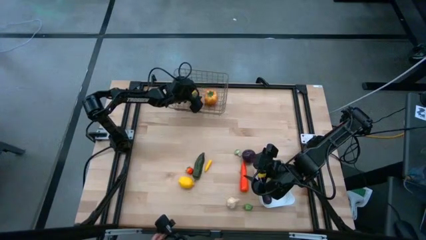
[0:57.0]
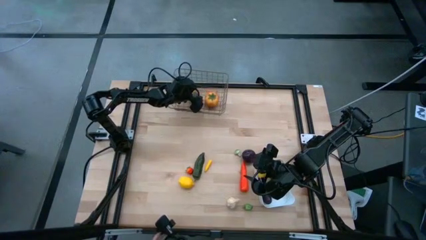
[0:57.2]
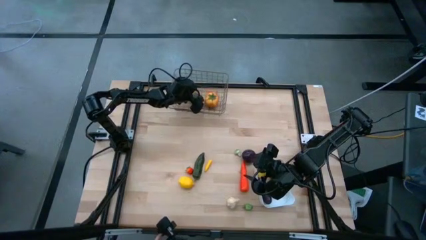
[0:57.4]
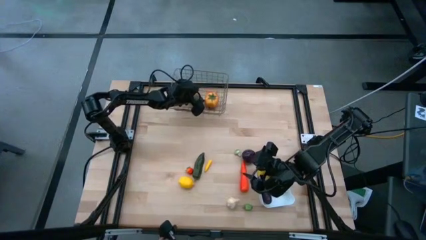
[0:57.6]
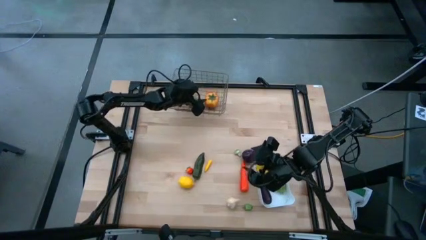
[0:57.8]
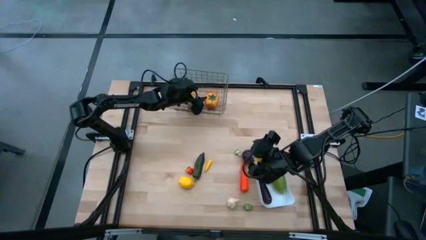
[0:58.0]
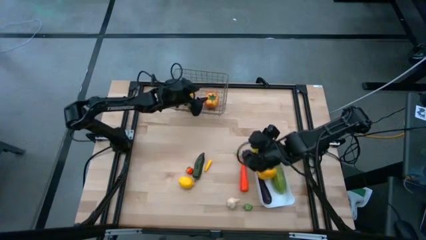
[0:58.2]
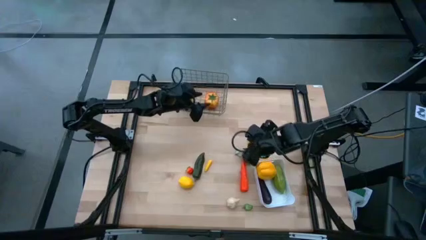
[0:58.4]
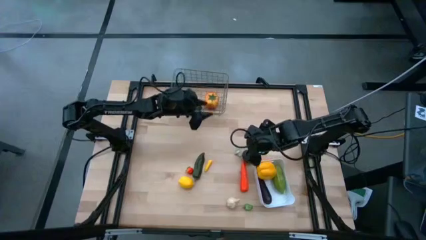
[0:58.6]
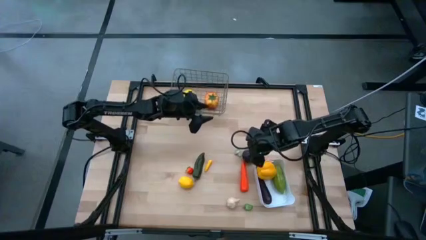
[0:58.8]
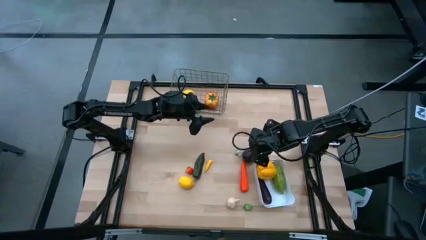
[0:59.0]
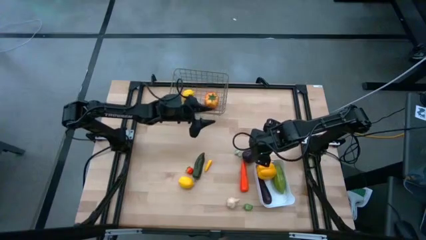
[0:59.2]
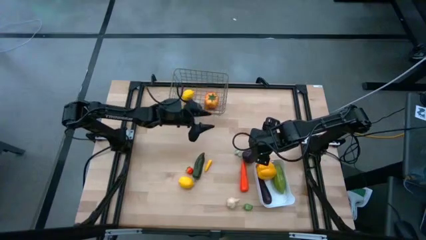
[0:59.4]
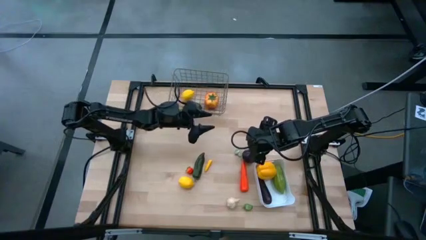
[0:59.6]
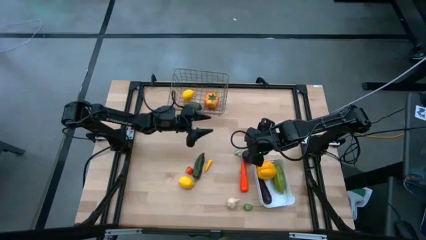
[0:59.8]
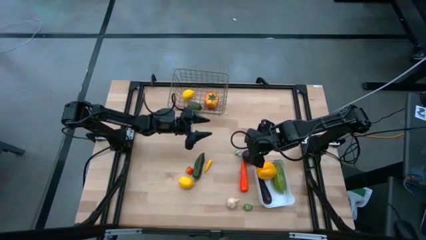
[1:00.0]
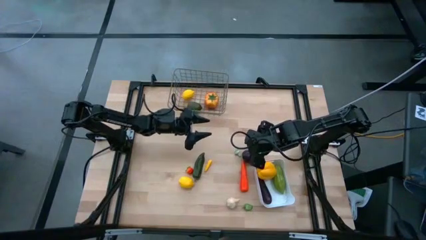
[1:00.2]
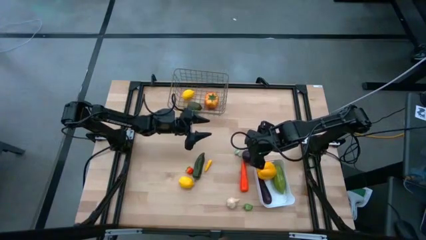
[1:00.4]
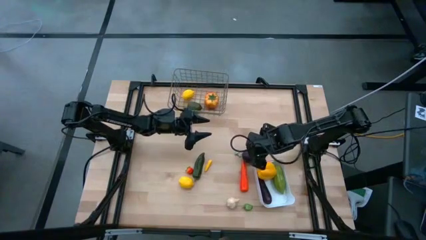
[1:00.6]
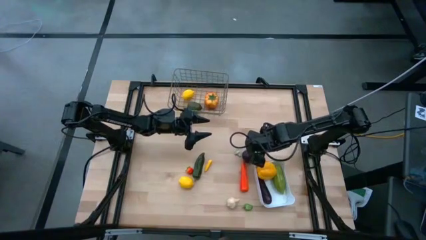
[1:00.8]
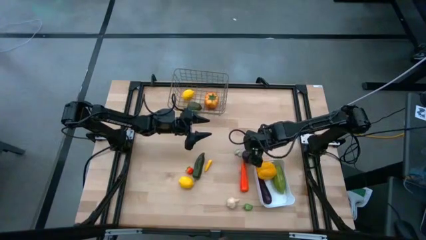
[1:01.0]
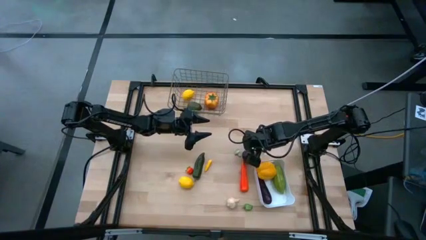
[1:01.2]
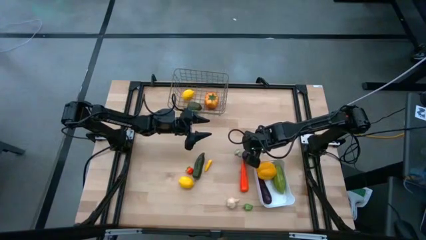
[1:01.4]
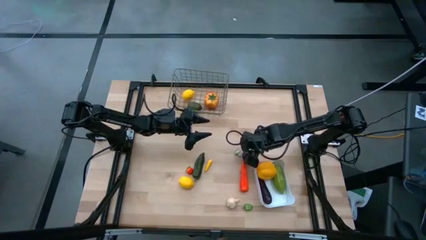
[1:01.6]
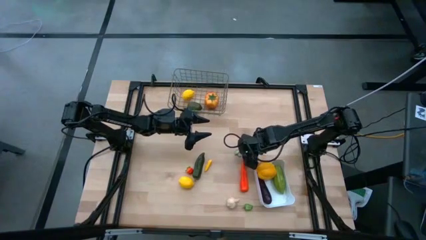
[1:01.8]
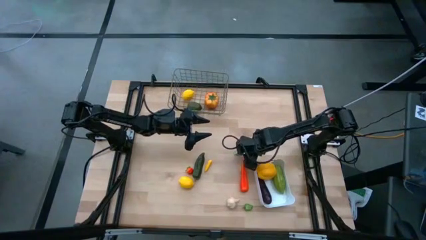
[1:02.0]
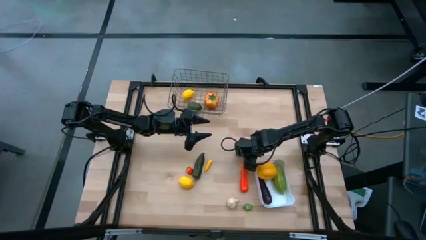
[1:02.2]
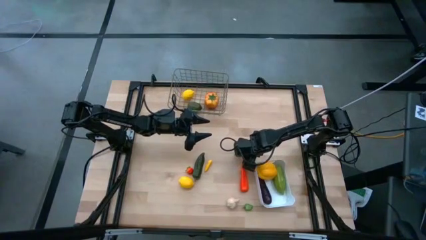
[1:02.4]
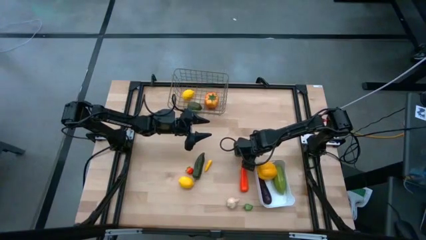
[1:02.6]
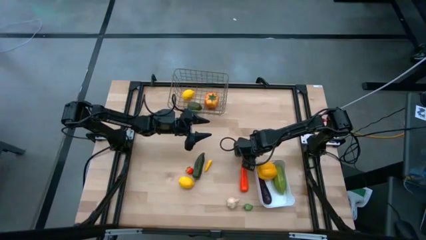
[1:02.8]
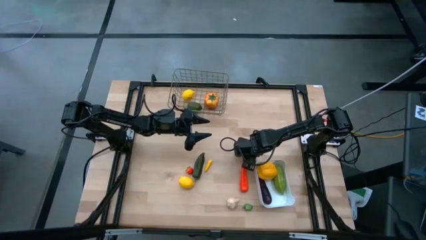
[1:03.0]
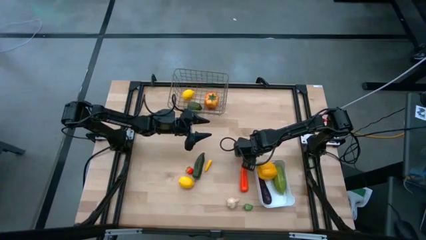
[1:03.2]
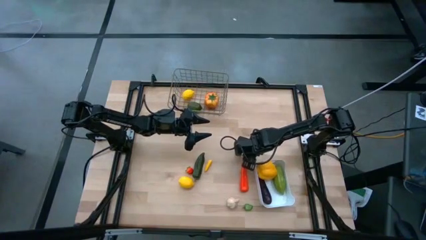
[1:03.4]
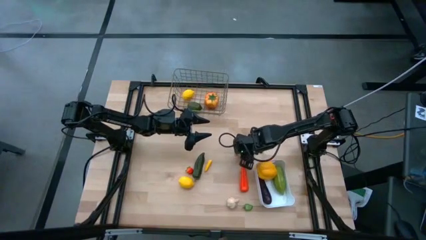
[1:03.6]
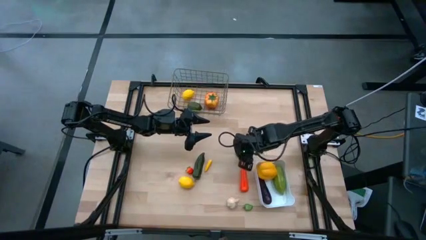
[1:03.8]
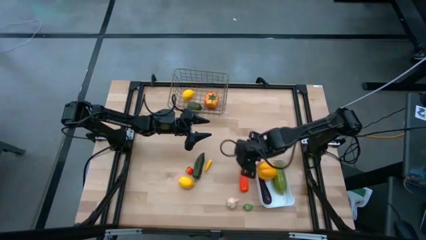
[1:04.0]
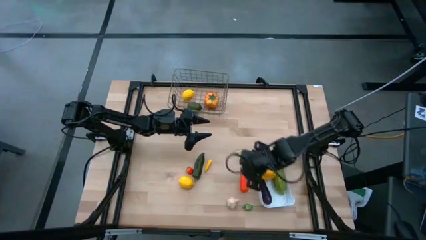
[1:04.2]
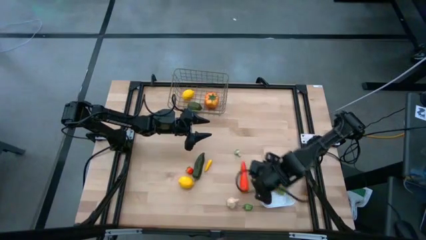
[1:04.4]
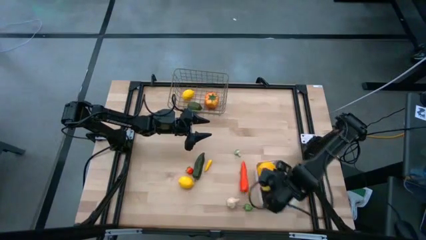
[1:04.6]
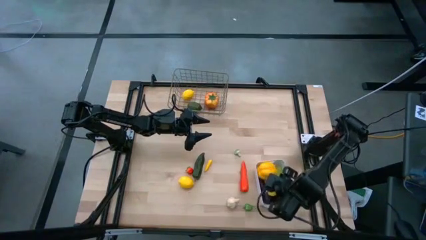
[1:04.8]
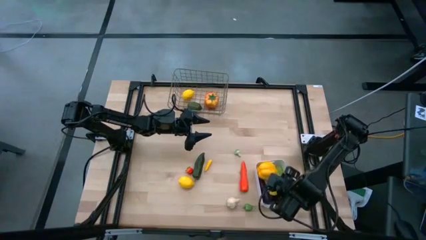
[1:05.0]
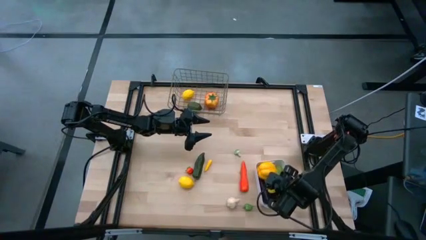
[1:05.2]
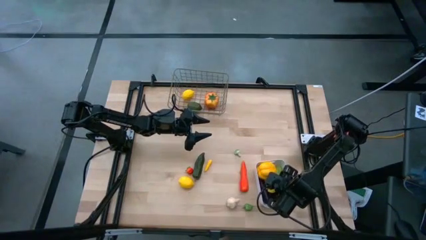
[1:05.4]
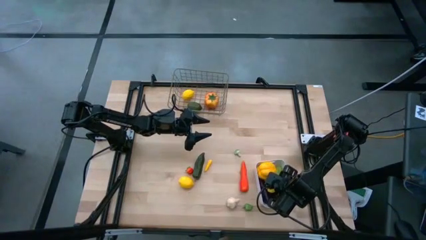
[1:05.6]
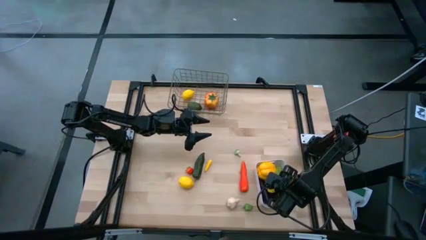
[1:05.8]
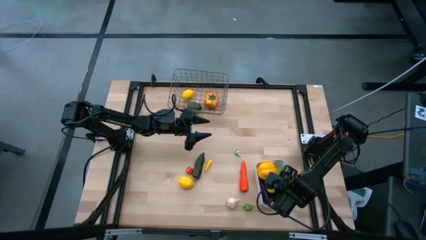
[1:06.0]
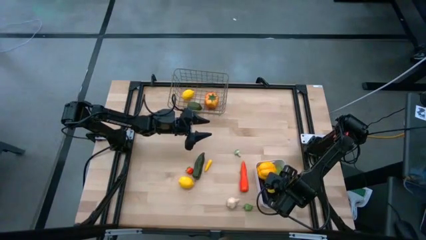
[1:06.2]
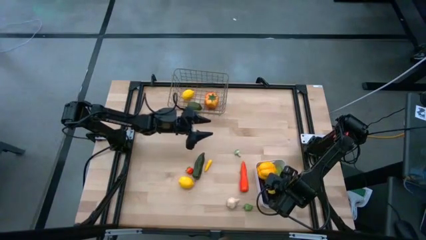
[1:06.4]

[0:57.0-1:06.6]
Task: Sort produce into baskets
Put the plum into the white bin

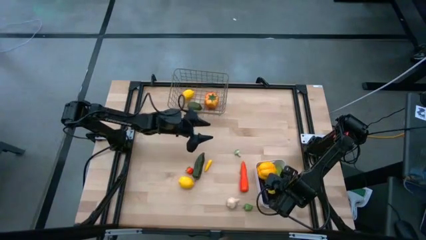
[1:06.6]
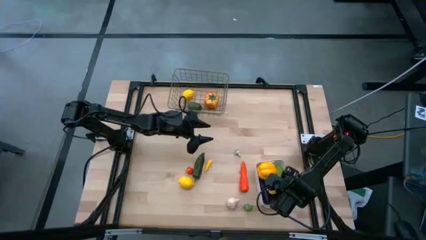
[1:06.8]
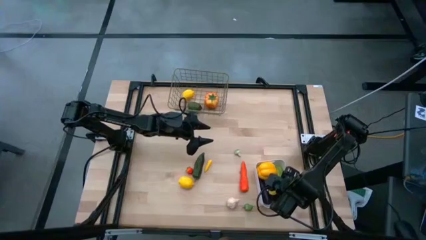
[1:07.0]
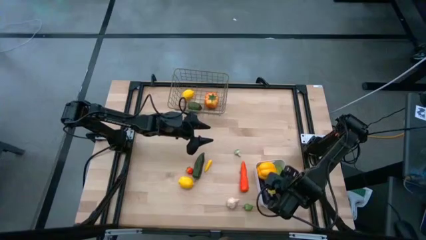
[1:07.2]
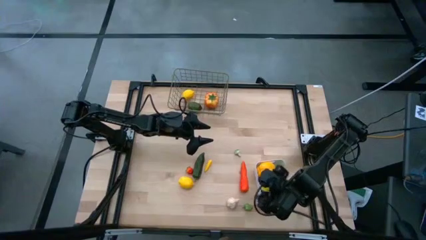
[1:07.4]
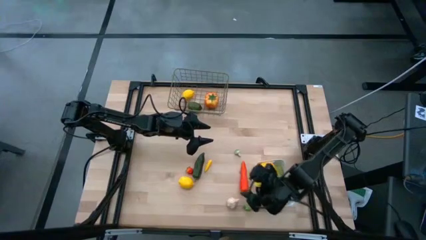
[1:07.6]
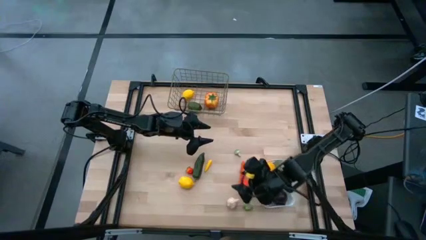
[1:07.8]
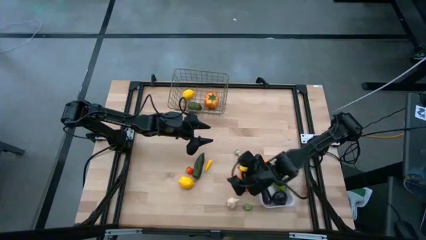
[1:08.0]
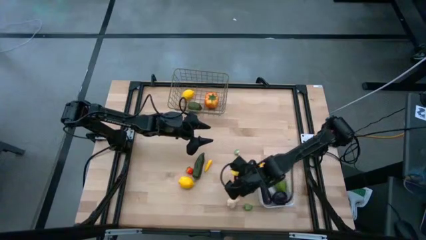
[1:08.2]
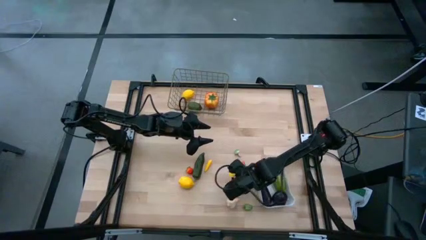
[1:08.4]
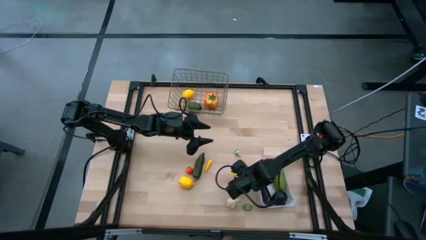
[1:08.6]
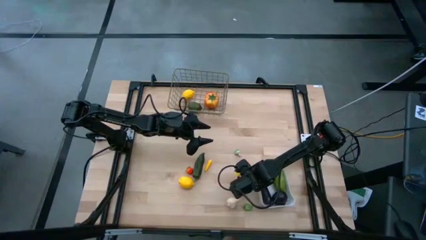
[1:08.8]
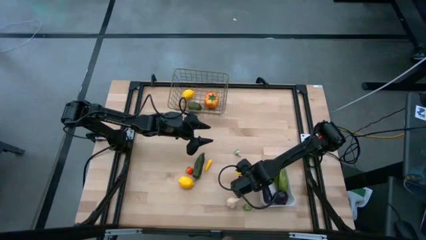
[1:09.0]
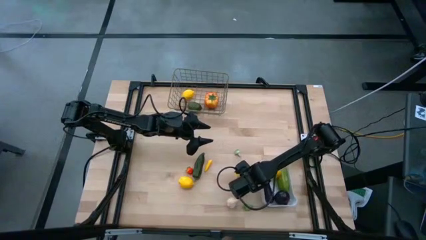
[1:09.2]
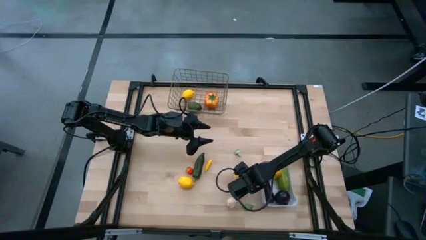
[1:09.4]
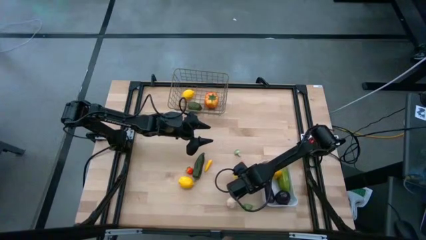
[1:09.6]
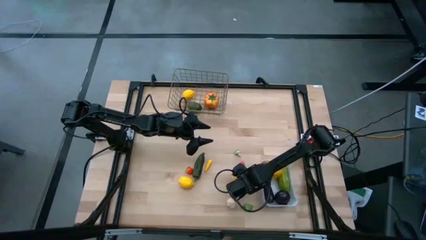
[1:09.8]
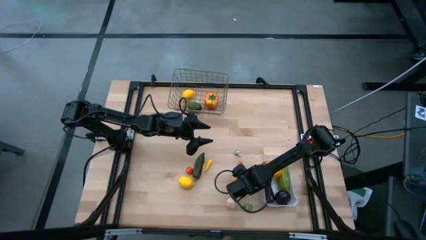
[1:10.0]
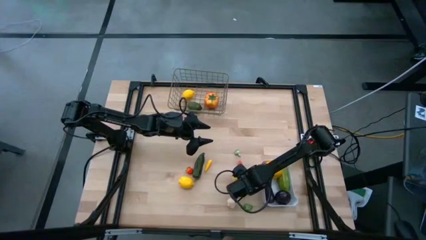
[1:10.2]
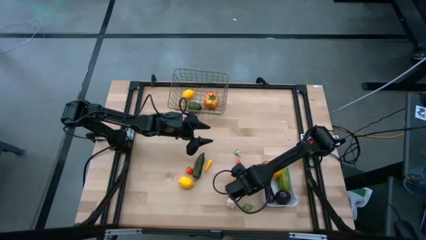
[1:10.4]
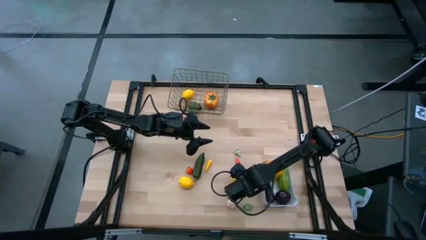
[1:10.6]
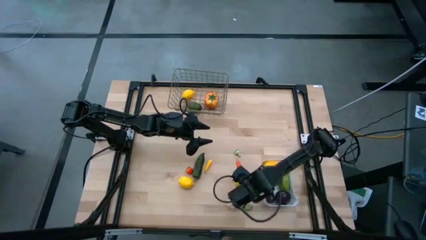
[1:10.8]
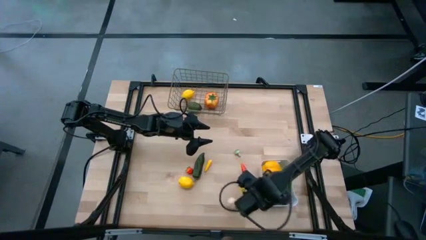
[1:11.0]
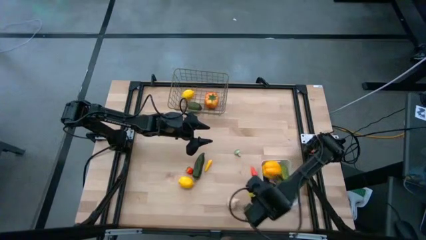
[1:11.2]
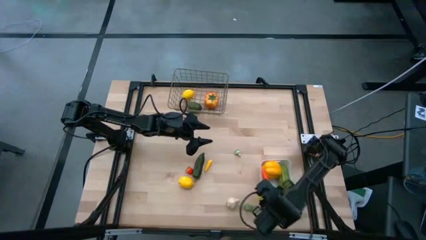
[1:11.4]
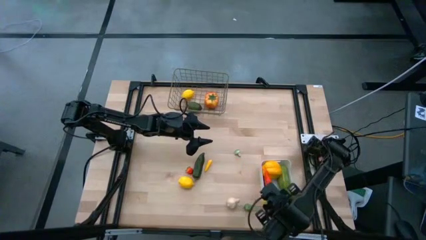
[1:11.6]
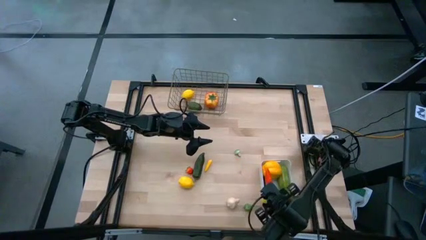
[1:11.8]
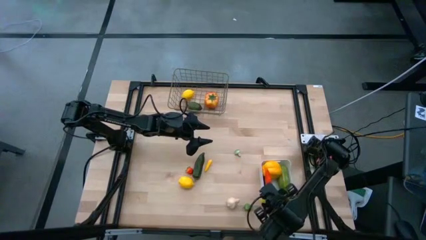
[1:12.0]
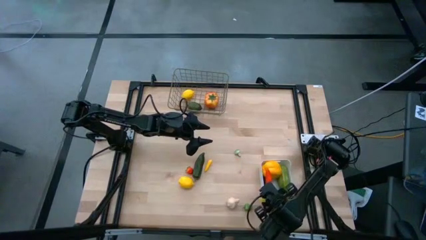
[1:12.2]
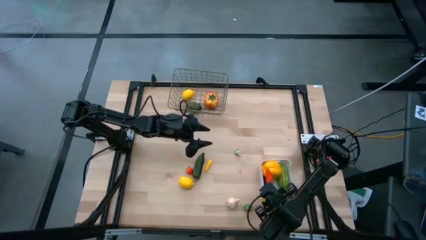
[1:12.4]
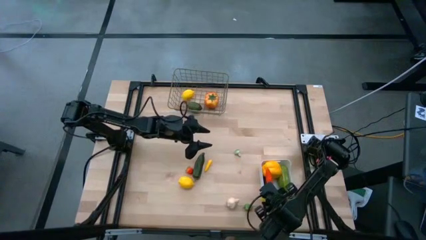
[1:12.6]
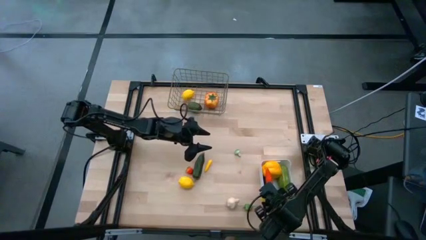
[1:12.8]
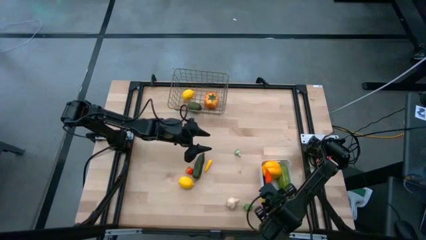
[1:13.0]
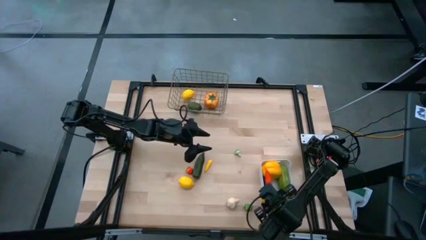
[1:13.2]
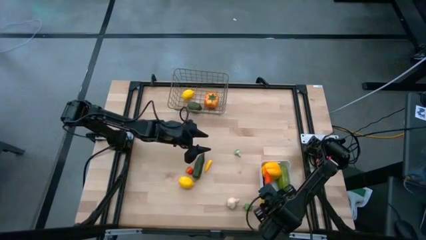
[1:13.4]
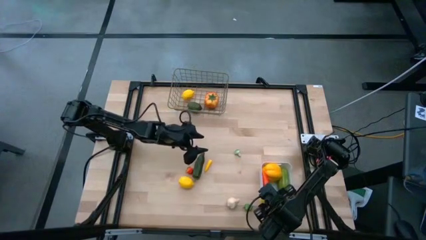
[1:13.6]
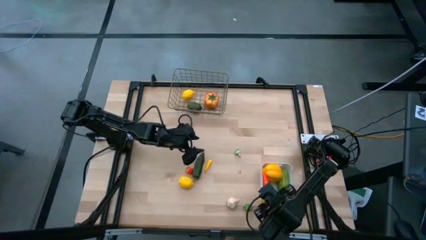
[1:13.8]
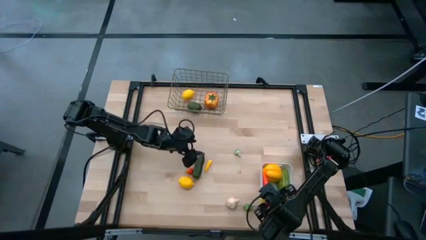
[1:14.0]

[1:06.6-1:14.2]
Put the carrot into the white bin
